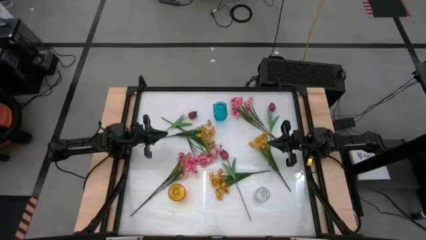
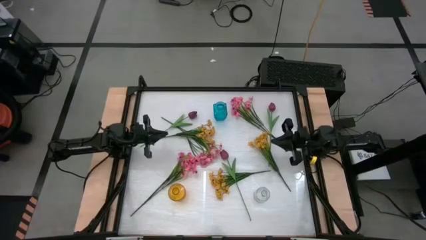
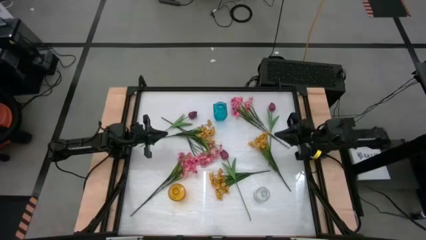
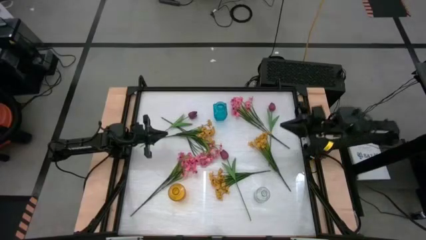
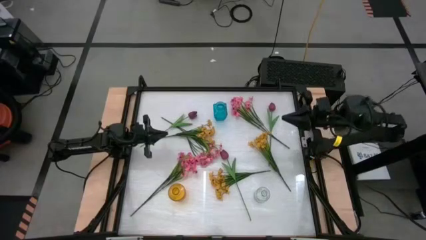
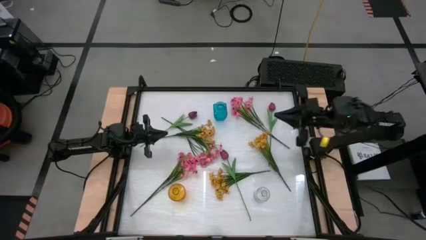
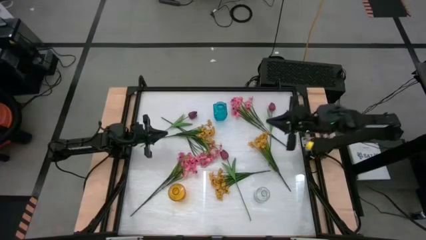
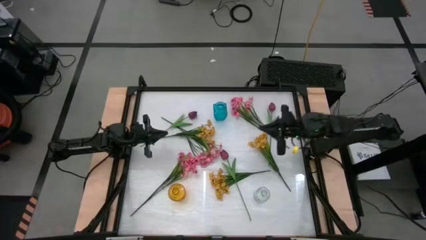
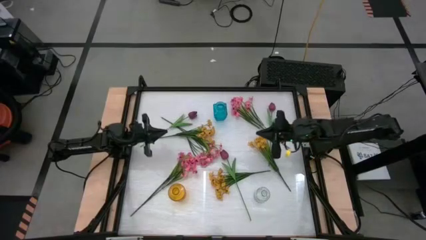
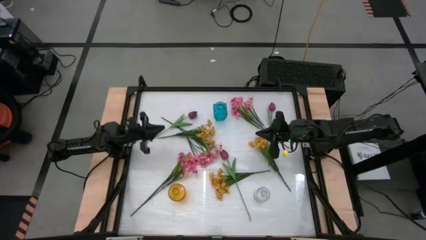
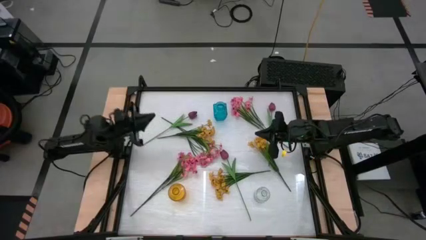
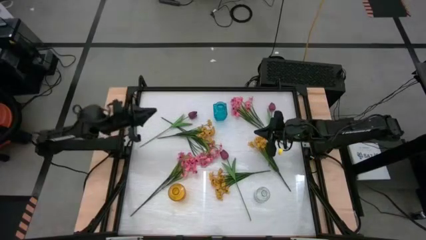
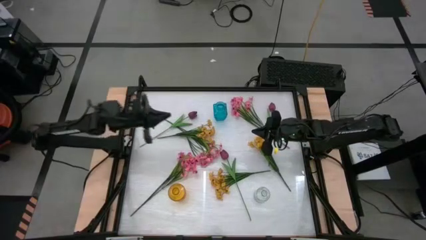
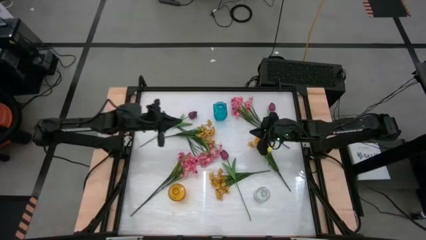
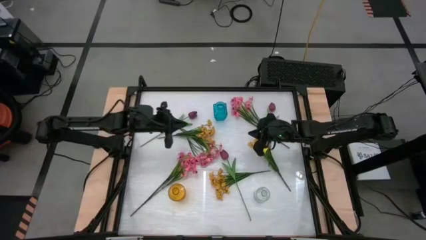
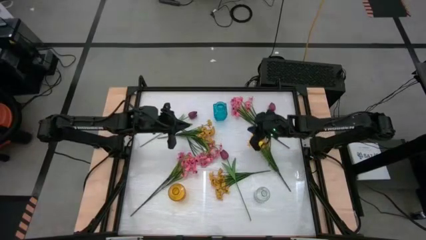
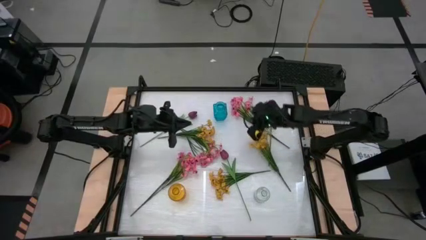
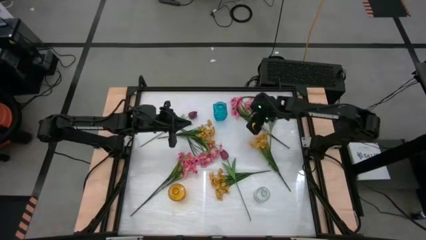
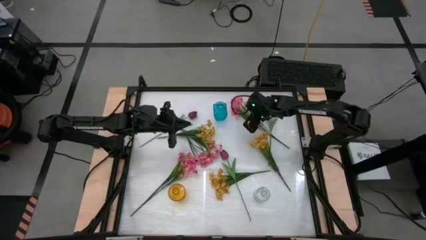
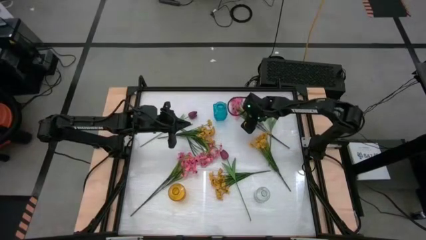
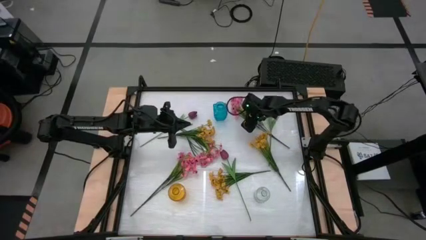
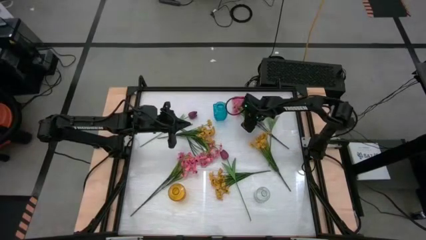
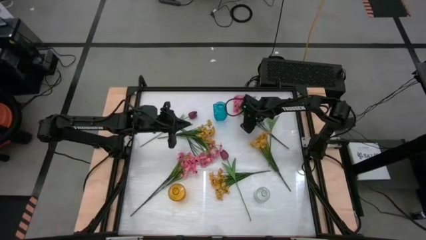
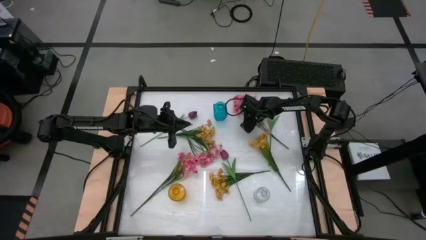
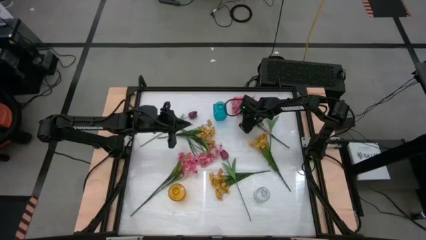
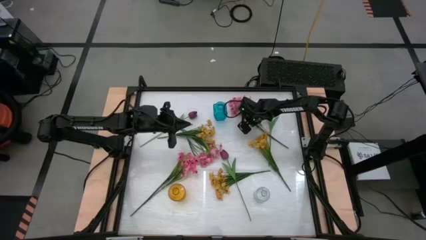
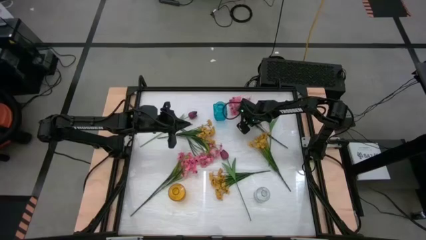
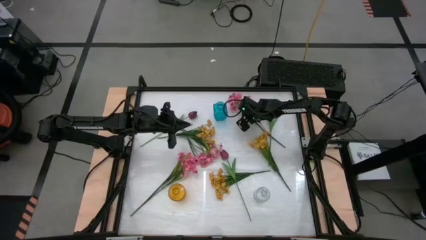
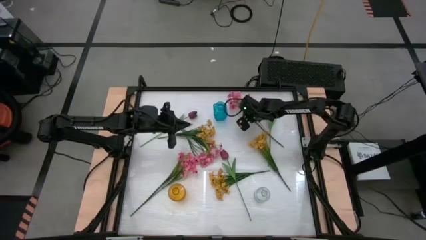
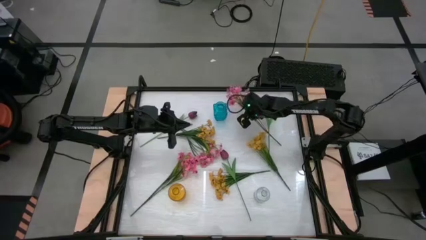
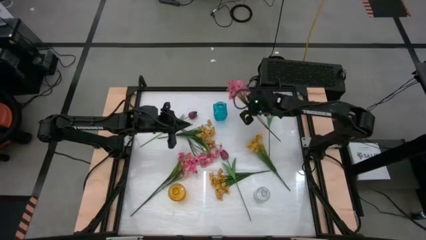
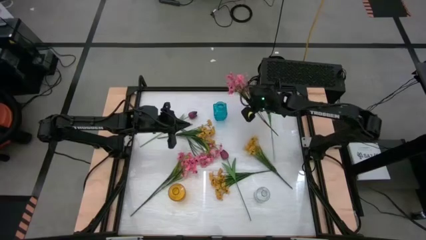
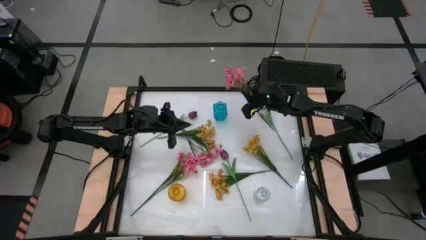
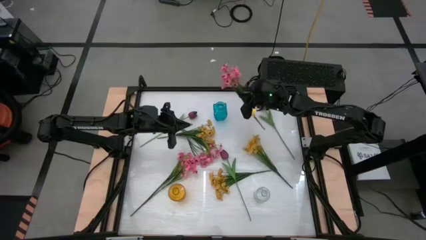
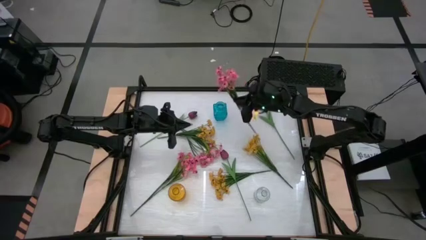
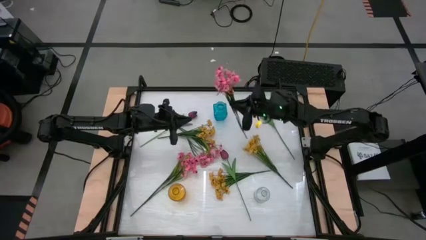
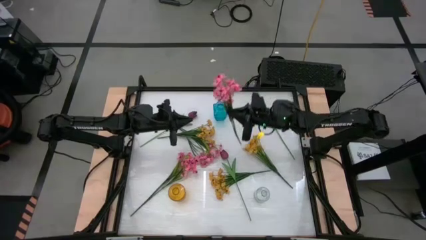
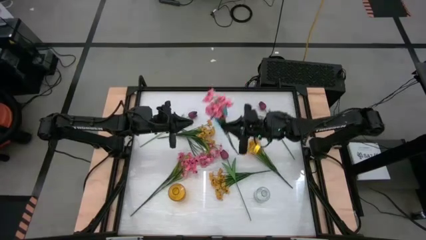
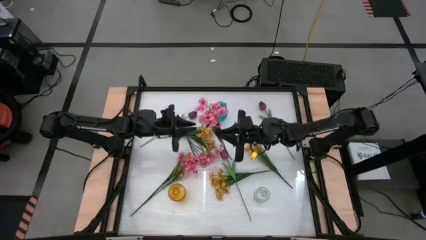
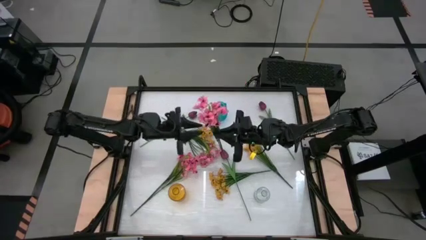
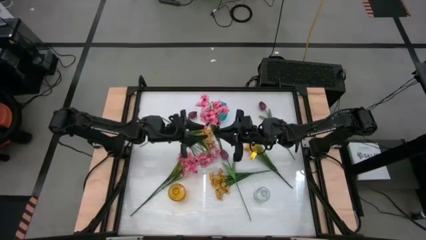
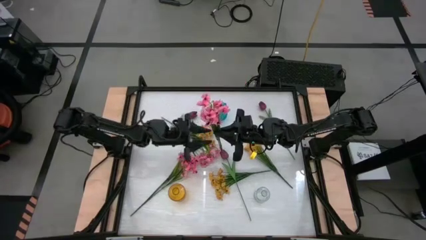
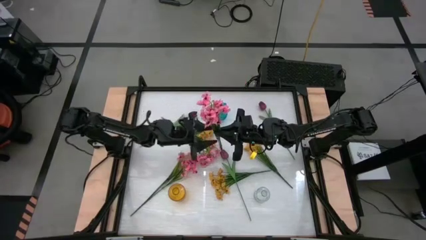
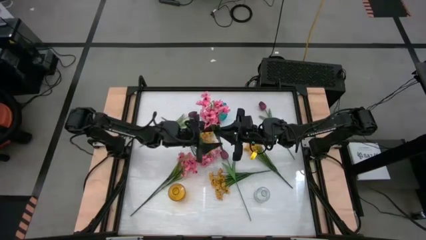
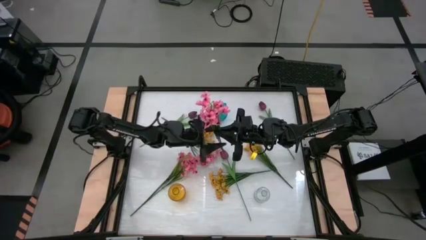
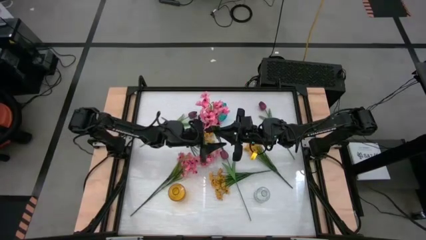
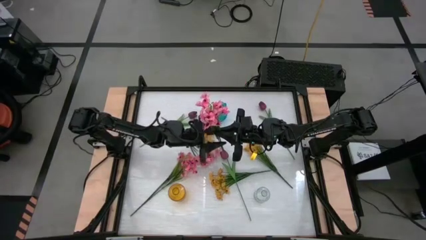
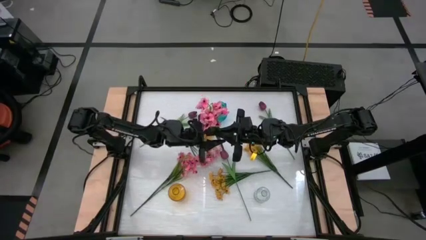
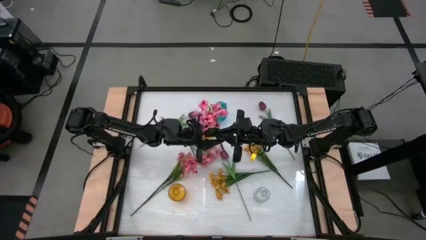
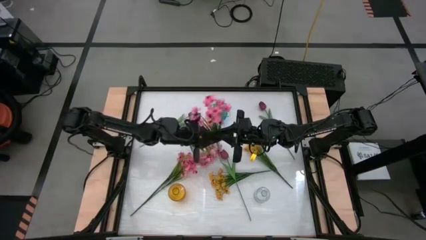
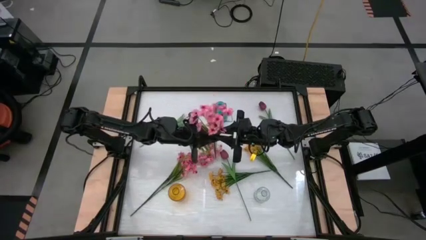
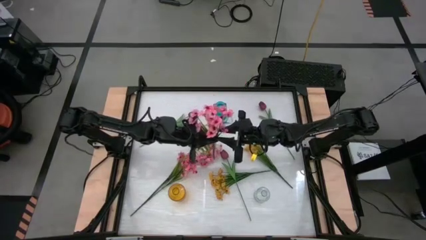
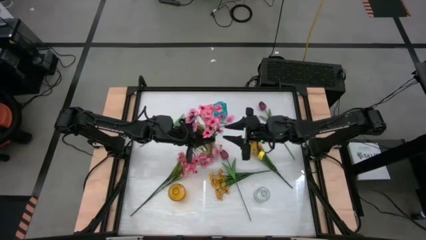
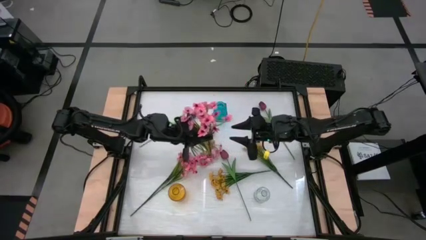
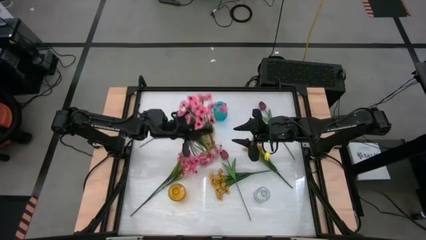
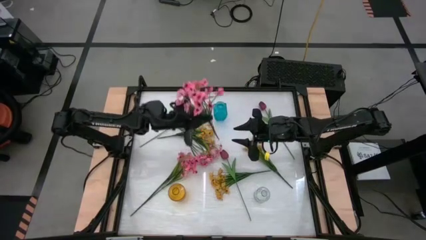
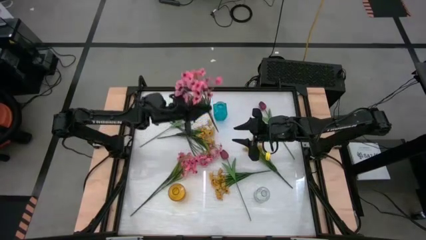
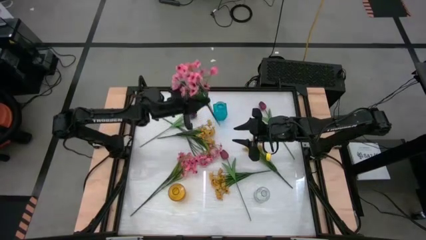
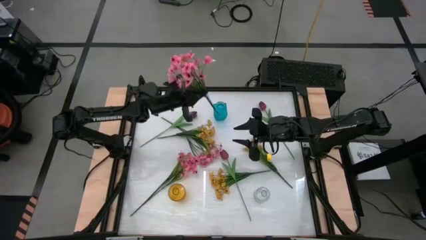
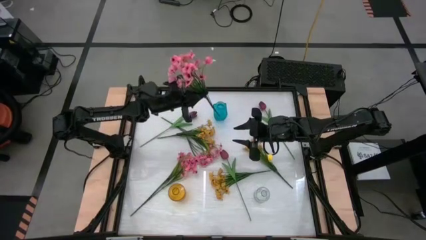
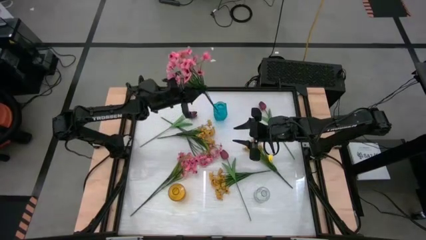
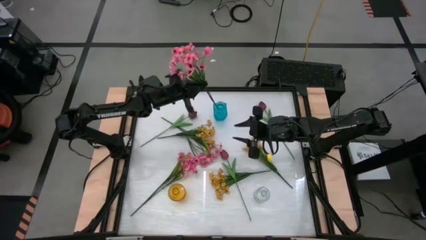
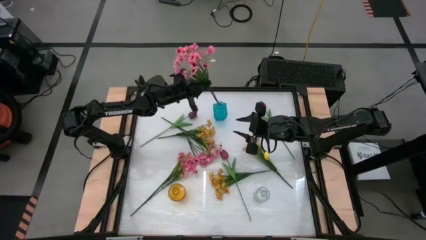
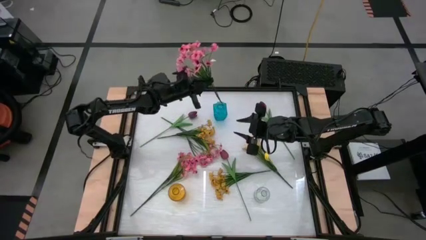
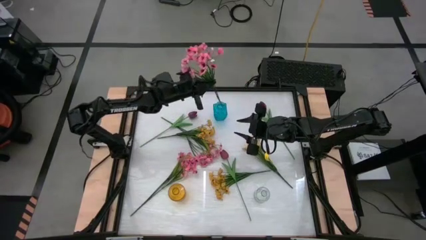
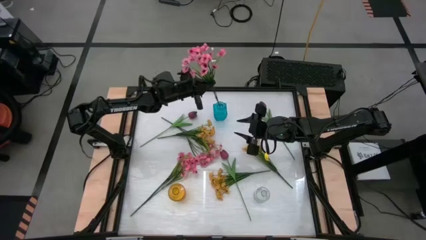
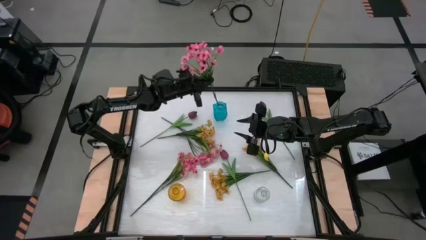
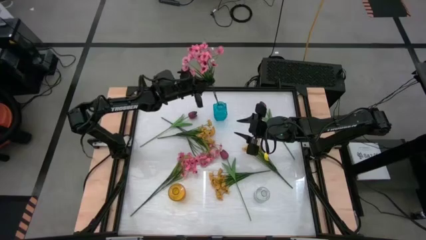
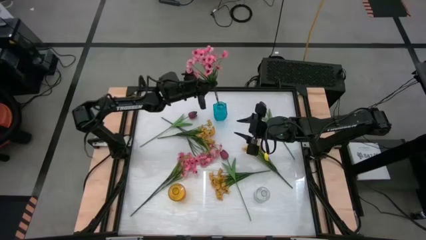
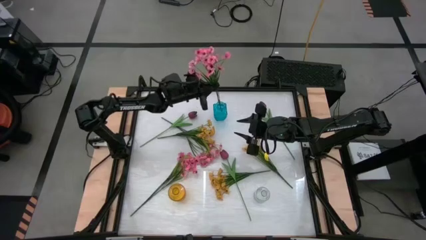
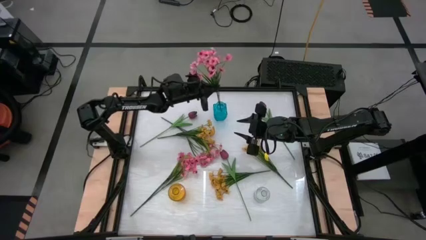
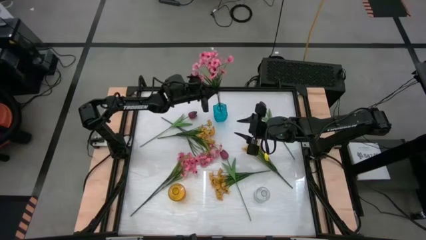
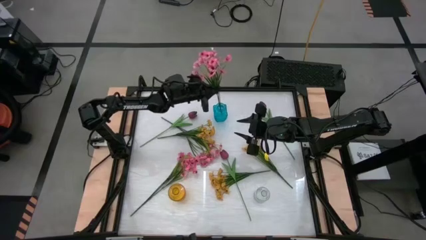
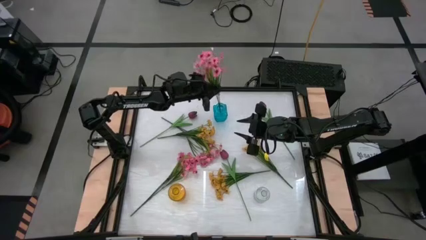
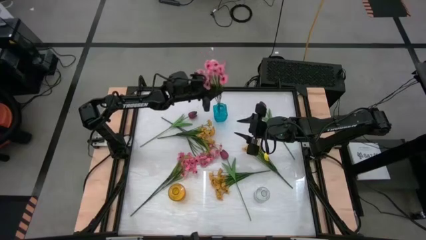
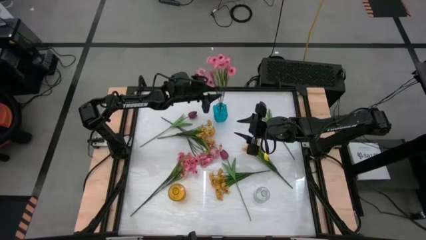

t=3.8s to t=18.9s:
Task: Sort flowers into vase by color
Put the top pink flowers into the blue vase
